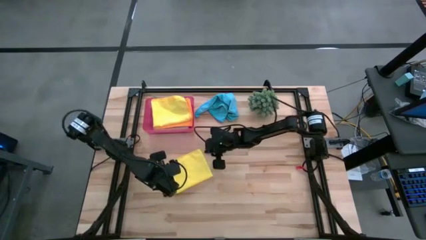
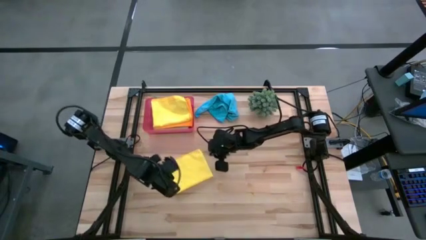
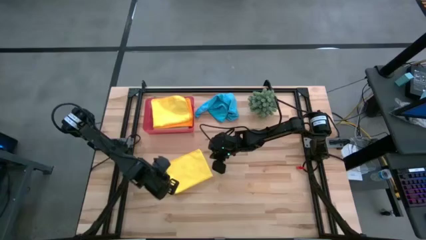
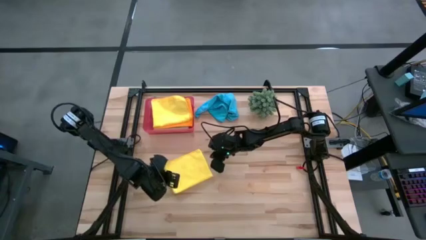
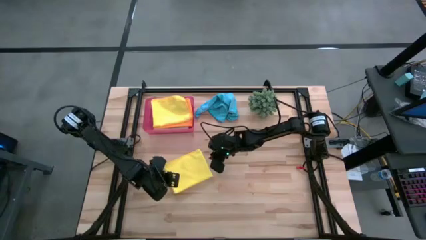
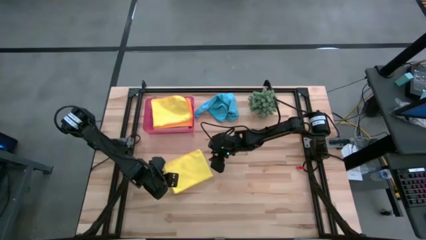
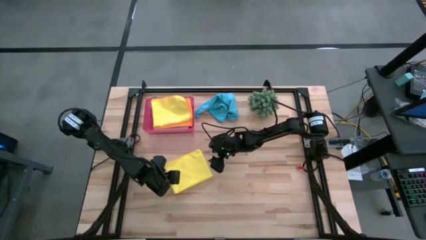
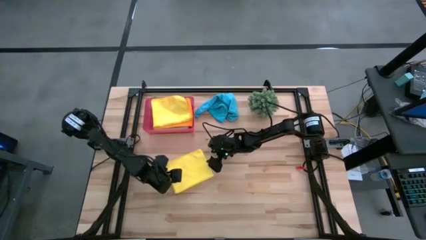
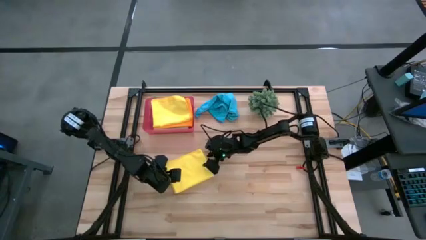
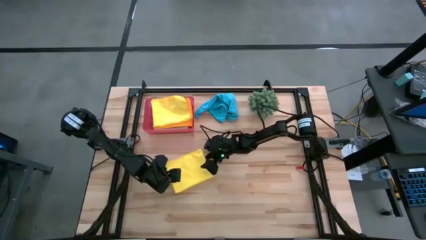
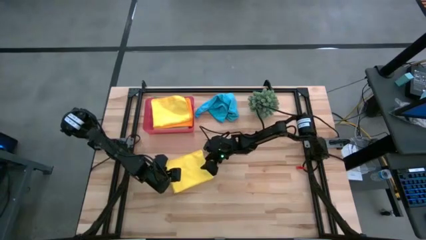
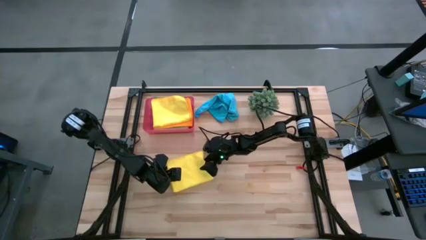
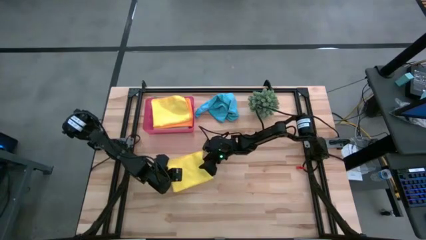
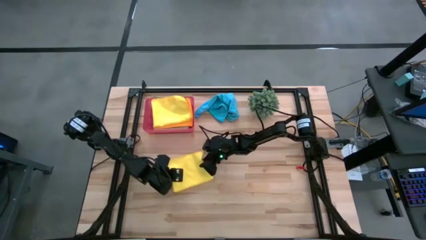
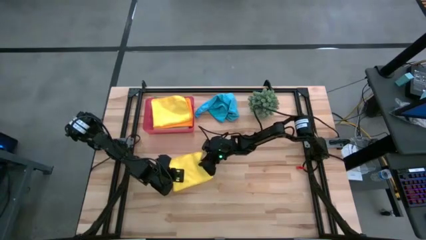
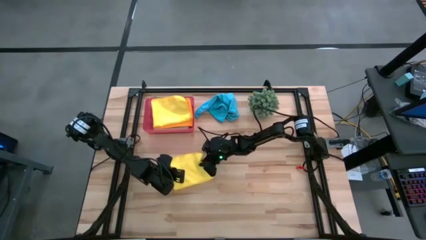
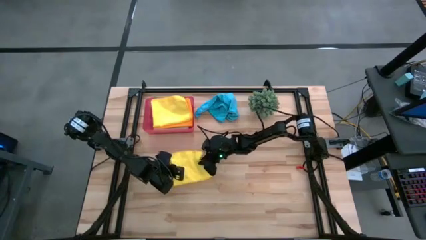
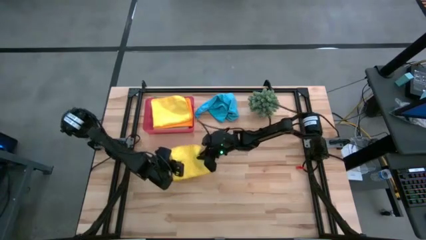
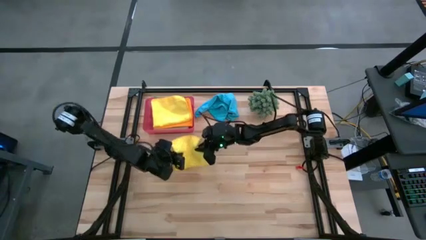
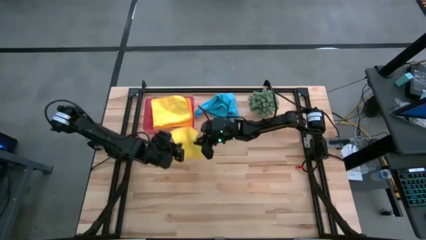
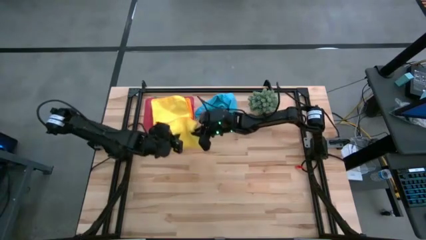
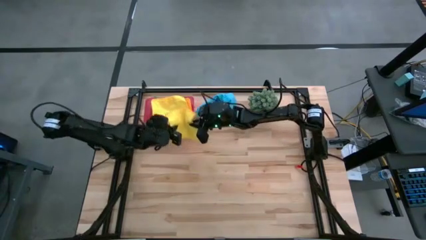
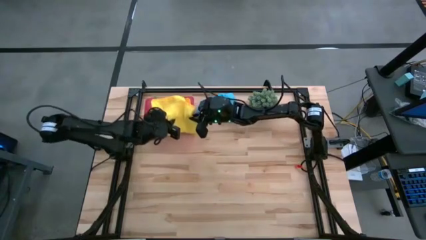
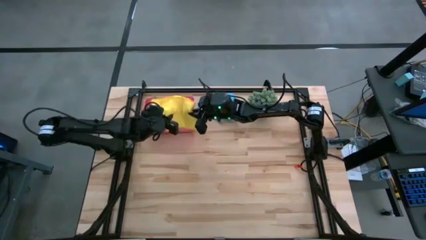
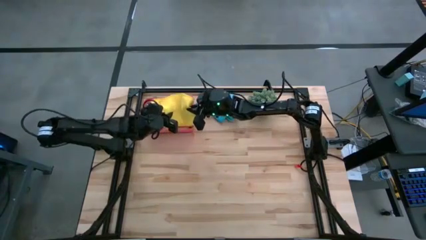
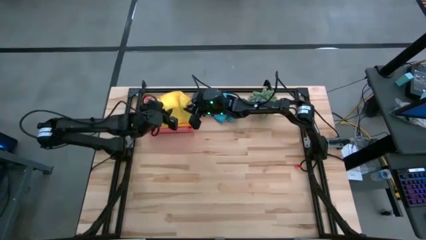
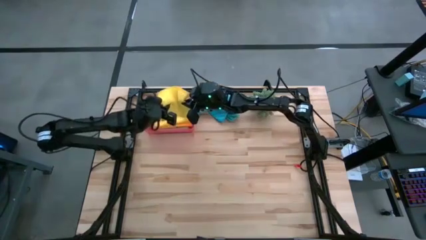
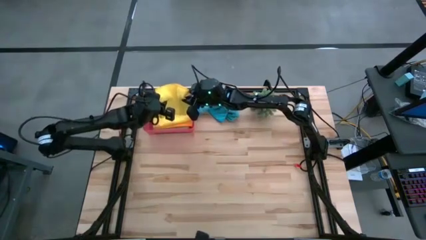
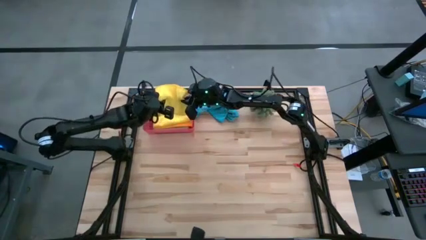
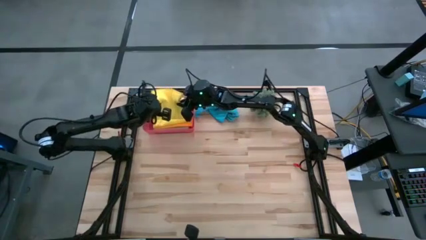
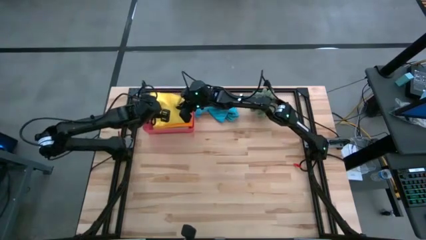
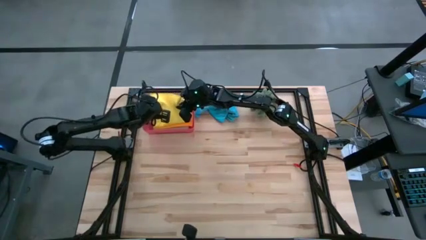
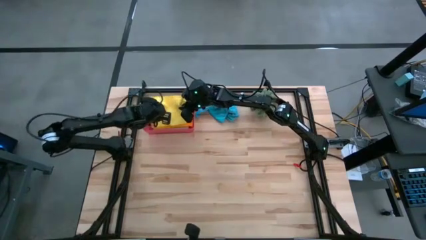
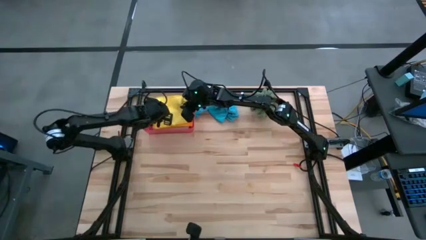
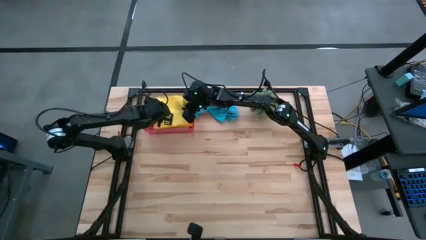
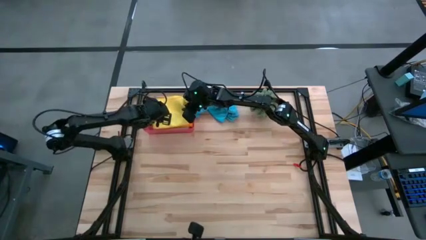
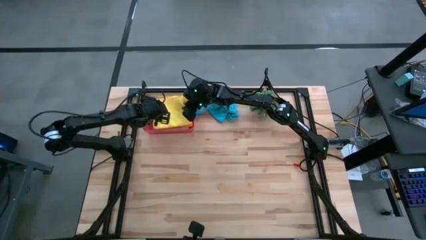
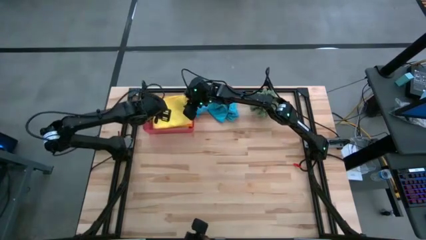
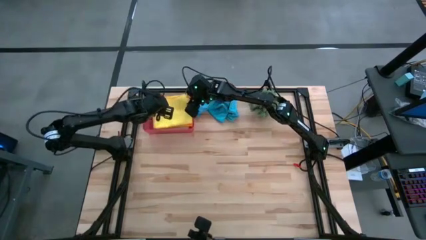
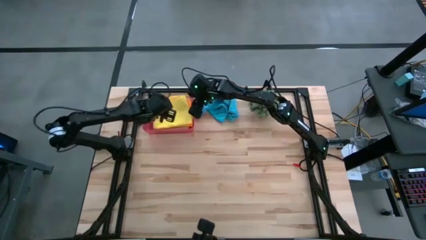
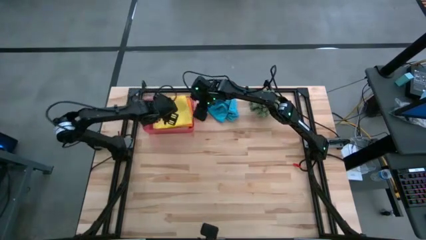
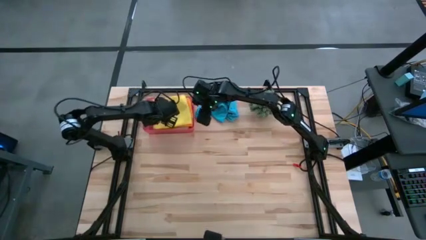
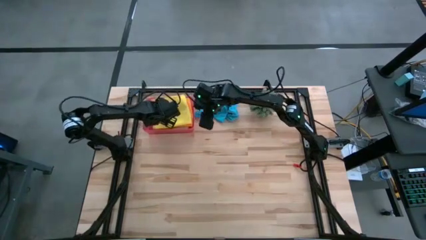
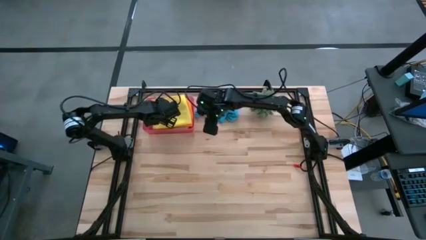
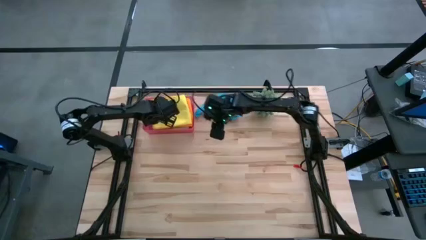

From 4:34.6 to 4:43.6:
Task: Fold microfiber towels
Put the yellow towel into the red bin
